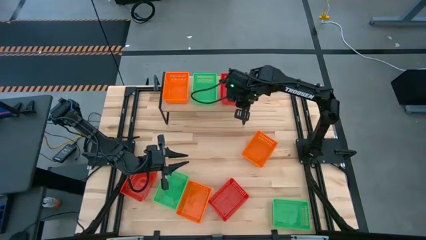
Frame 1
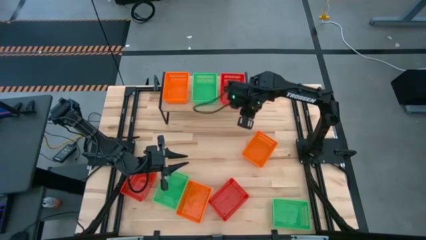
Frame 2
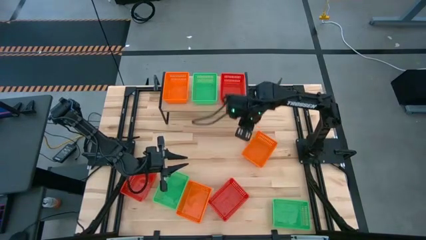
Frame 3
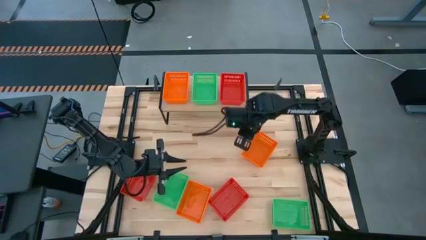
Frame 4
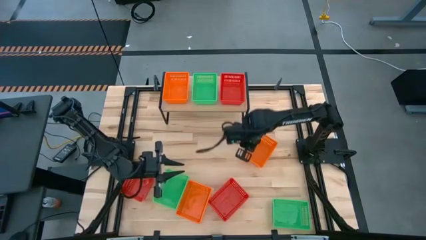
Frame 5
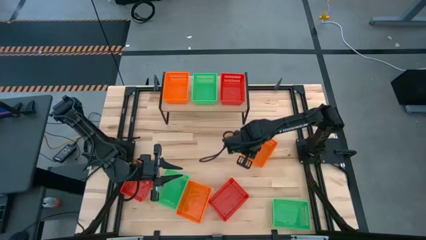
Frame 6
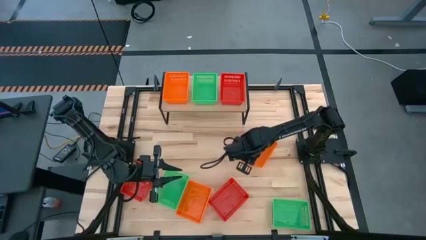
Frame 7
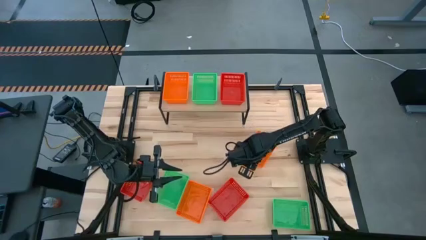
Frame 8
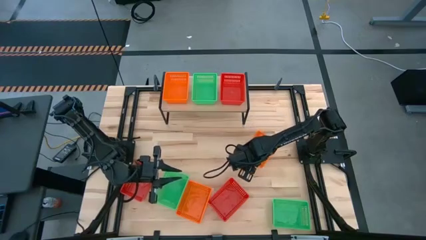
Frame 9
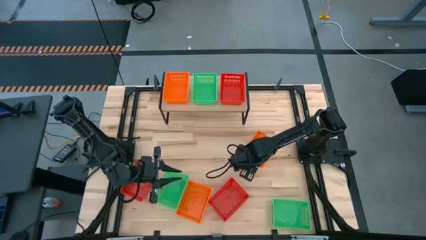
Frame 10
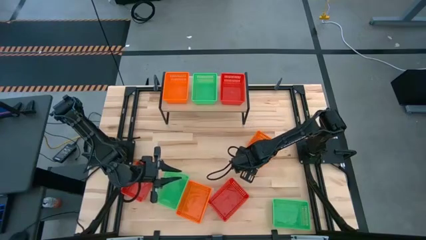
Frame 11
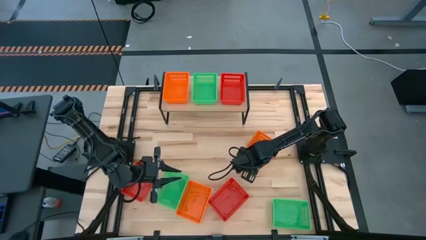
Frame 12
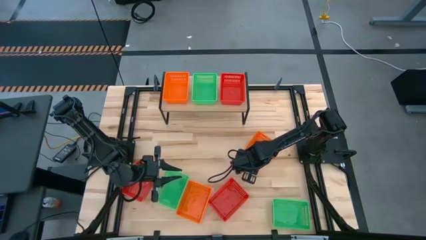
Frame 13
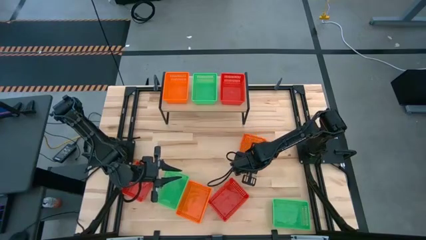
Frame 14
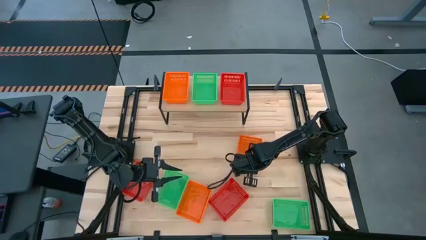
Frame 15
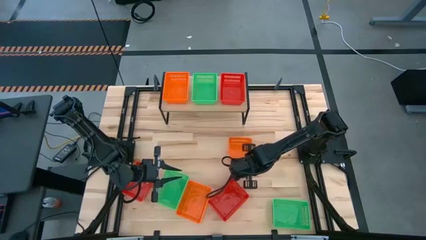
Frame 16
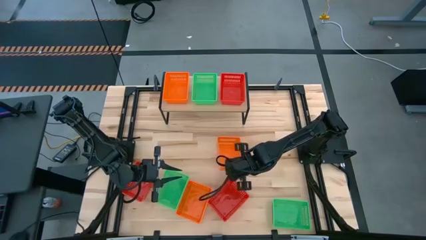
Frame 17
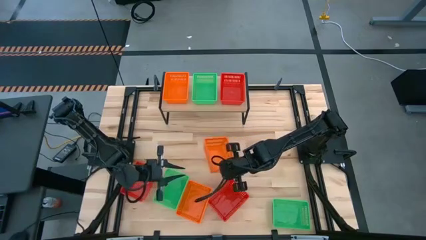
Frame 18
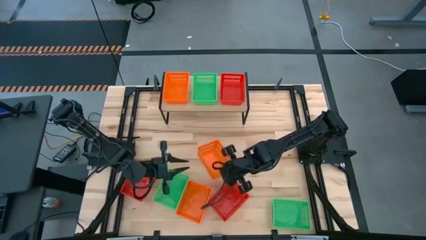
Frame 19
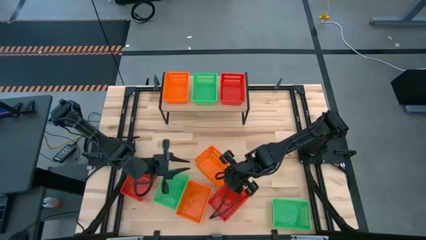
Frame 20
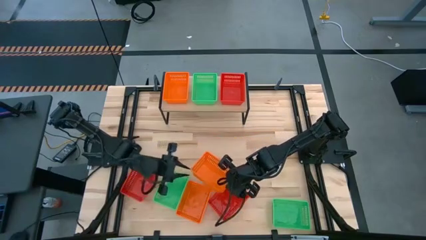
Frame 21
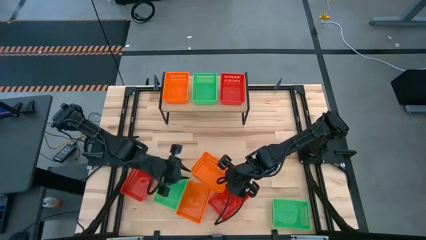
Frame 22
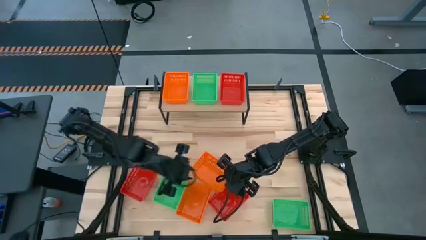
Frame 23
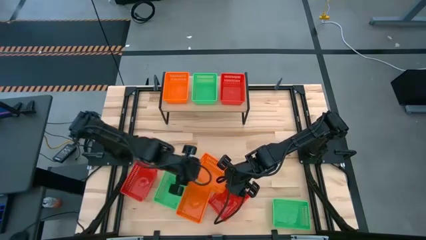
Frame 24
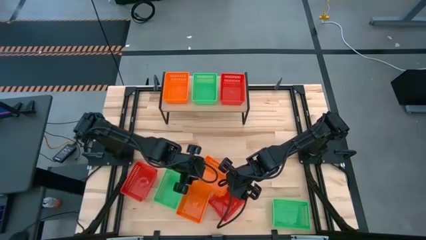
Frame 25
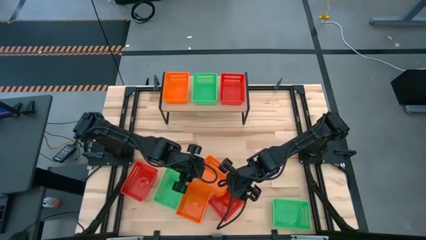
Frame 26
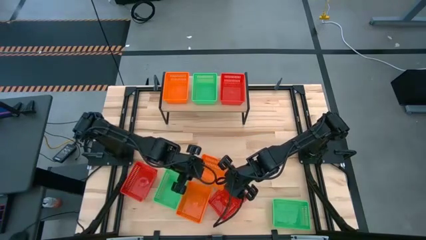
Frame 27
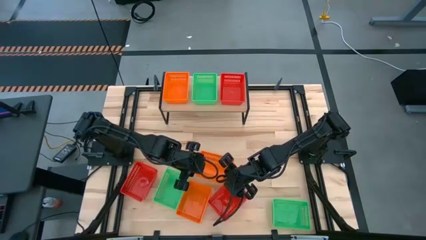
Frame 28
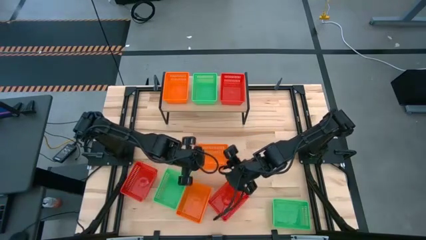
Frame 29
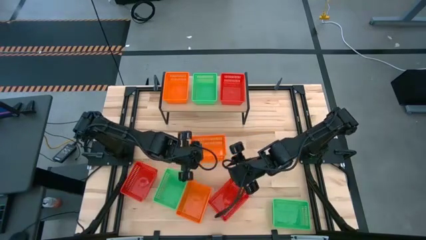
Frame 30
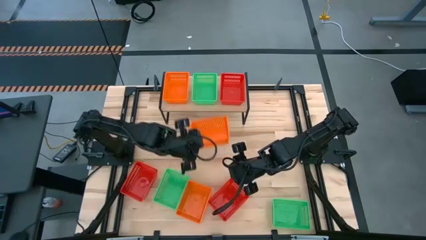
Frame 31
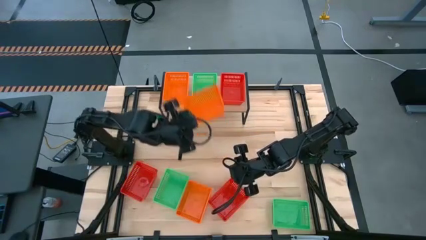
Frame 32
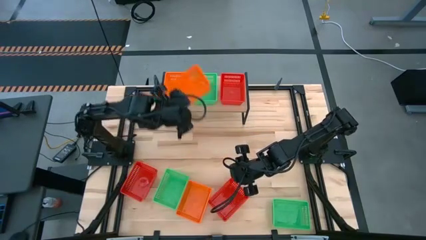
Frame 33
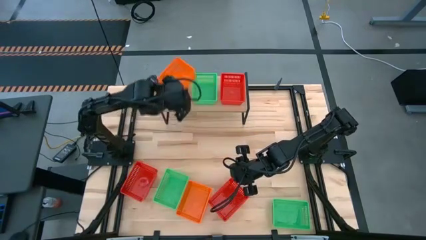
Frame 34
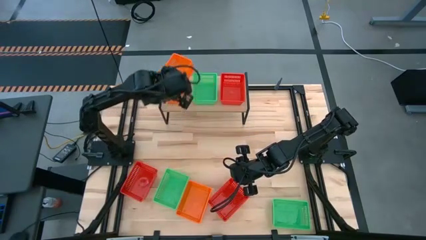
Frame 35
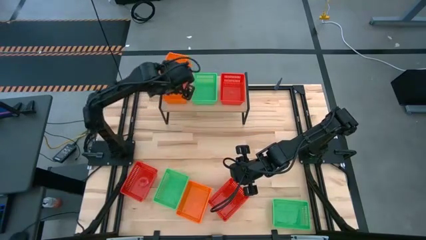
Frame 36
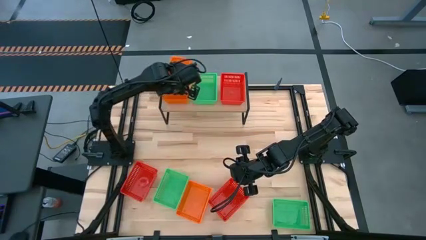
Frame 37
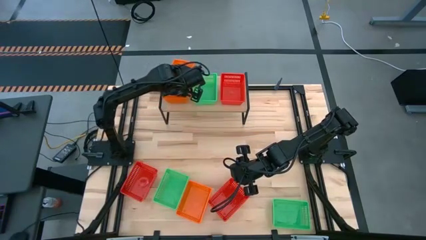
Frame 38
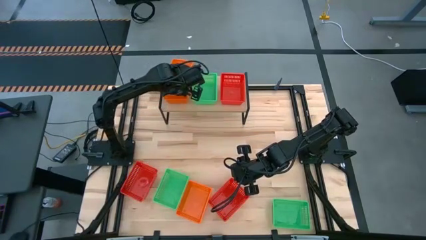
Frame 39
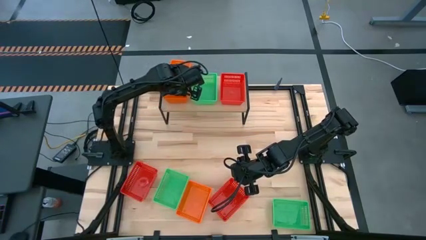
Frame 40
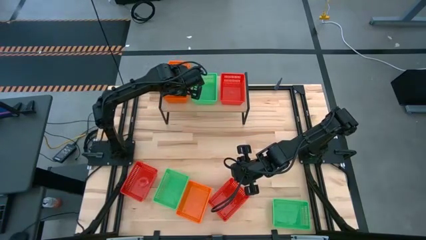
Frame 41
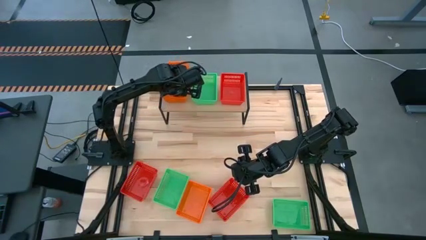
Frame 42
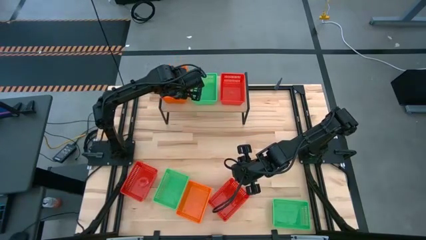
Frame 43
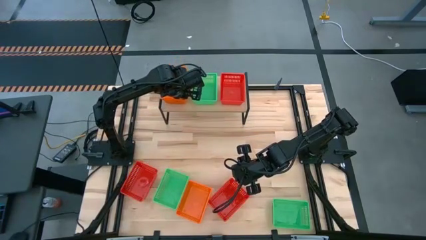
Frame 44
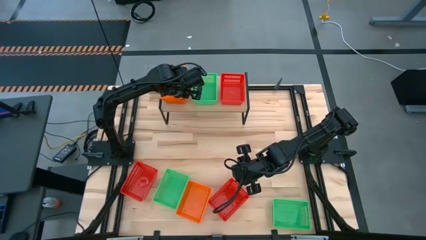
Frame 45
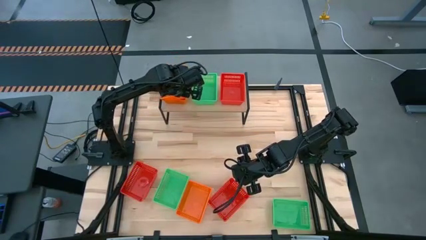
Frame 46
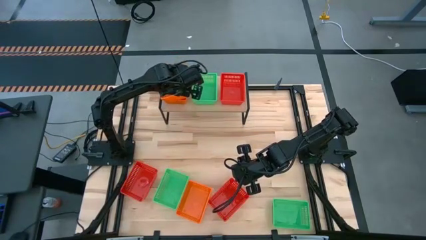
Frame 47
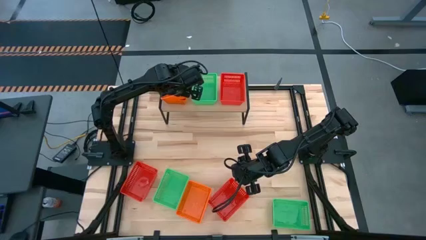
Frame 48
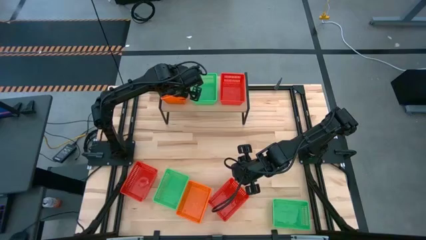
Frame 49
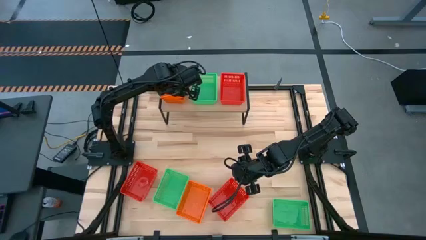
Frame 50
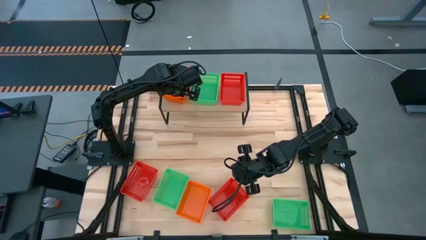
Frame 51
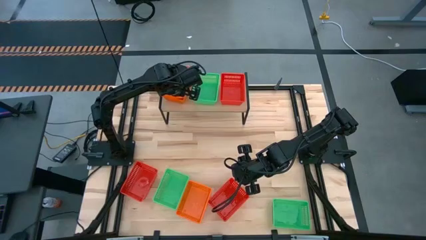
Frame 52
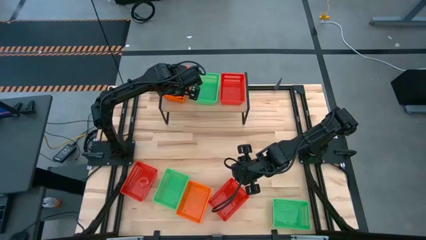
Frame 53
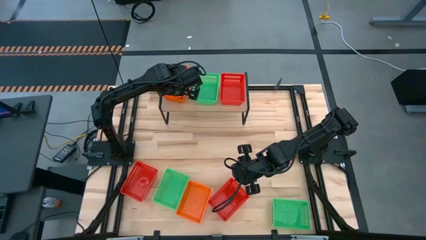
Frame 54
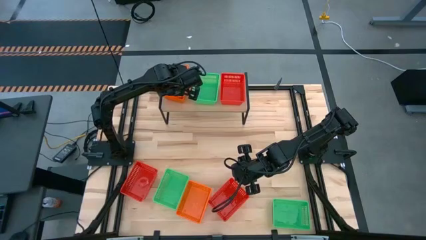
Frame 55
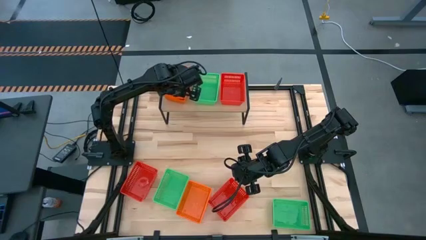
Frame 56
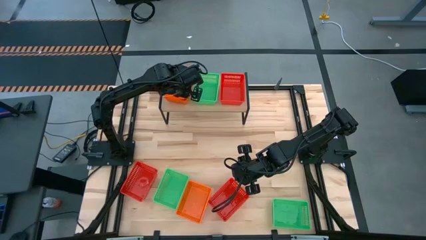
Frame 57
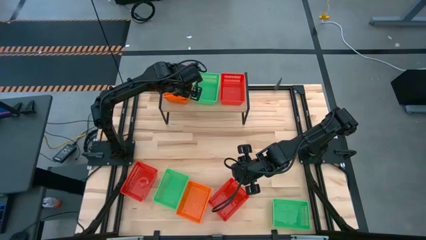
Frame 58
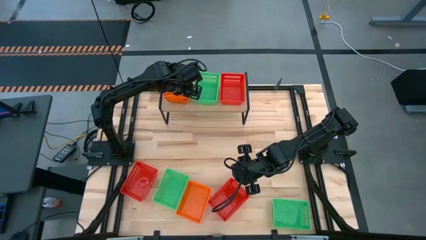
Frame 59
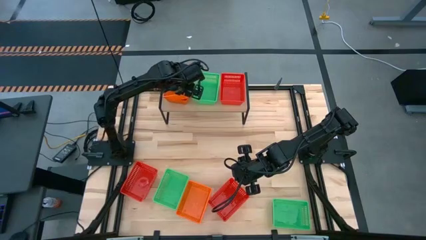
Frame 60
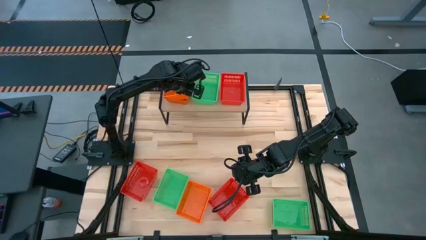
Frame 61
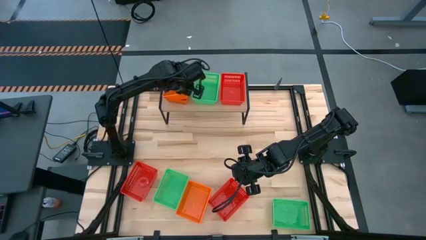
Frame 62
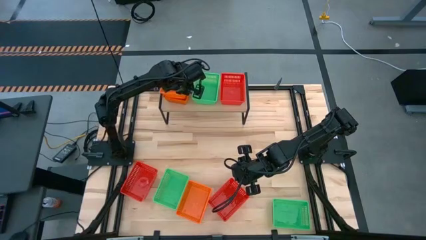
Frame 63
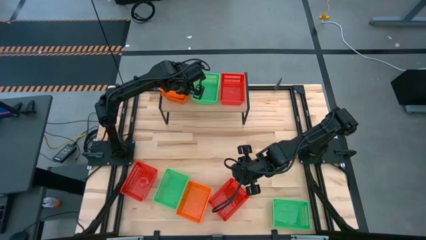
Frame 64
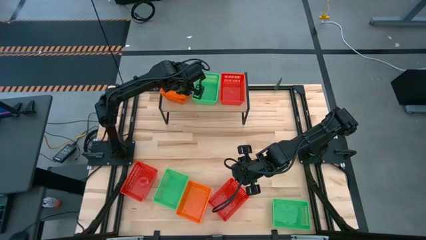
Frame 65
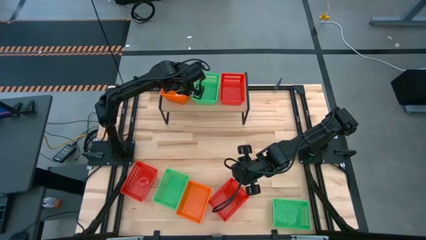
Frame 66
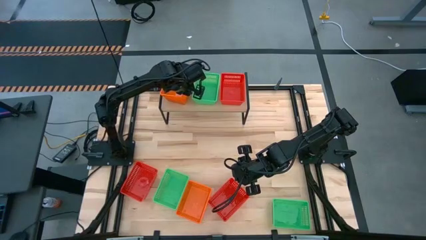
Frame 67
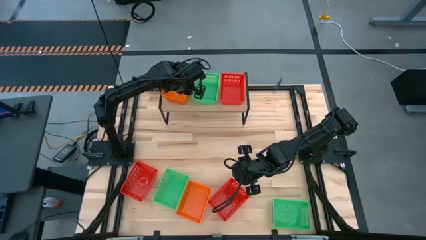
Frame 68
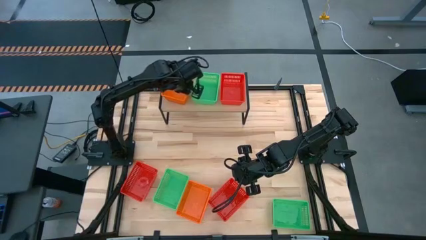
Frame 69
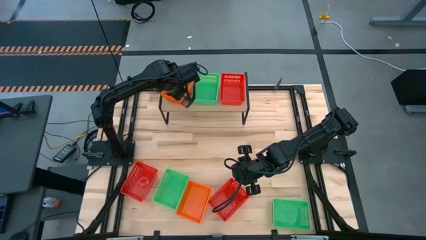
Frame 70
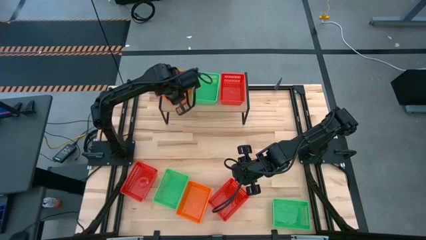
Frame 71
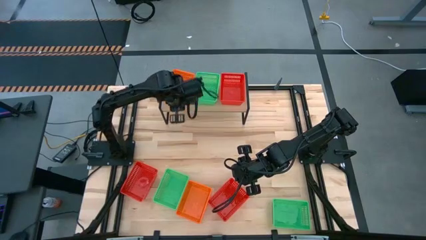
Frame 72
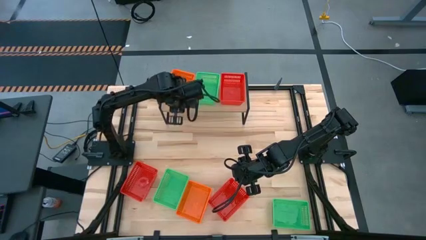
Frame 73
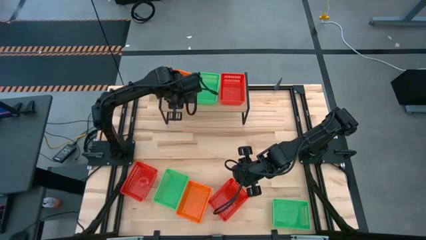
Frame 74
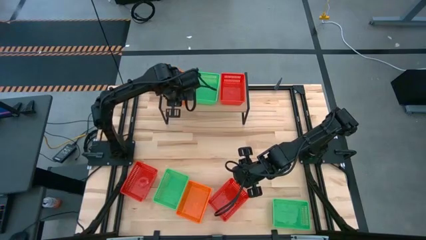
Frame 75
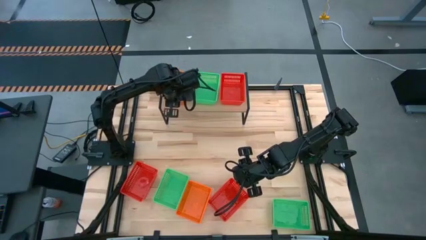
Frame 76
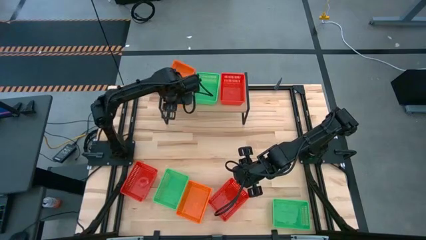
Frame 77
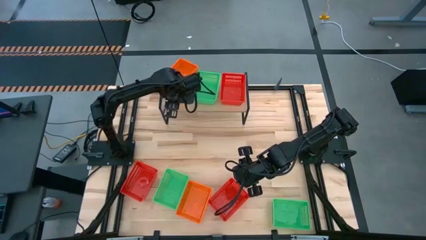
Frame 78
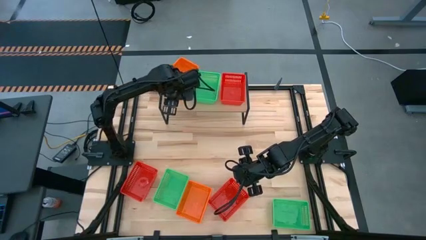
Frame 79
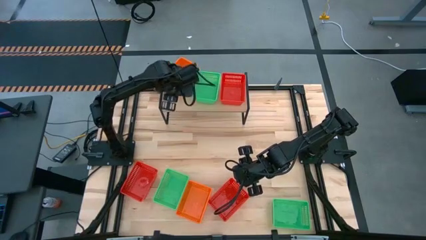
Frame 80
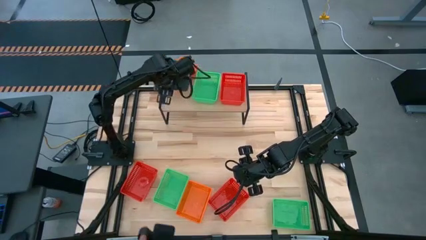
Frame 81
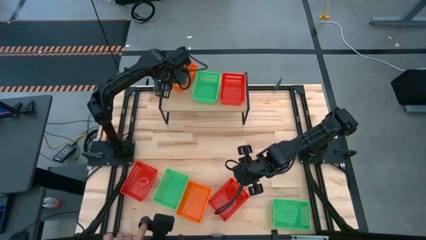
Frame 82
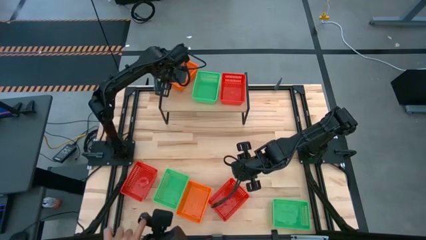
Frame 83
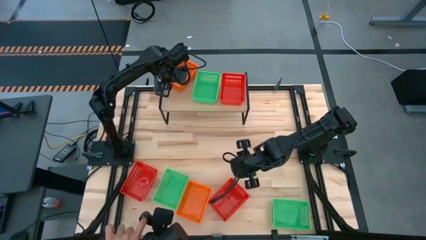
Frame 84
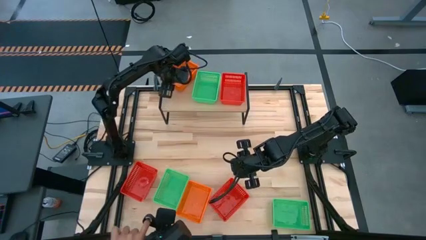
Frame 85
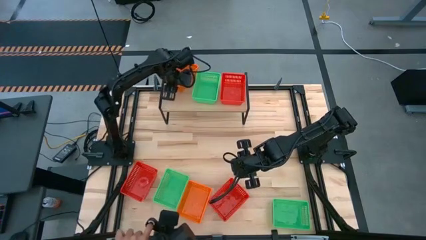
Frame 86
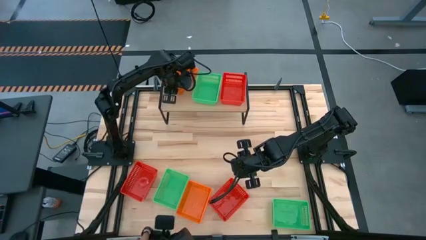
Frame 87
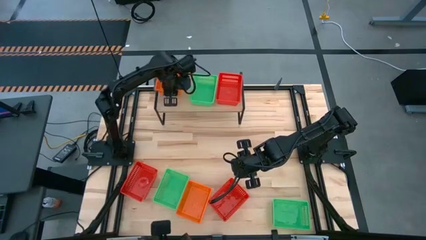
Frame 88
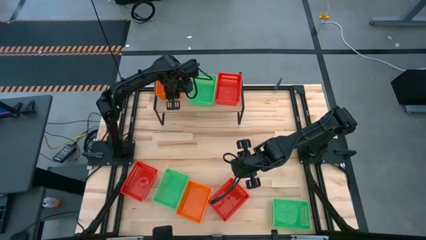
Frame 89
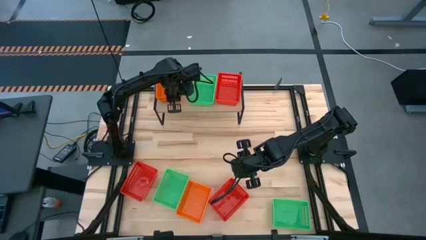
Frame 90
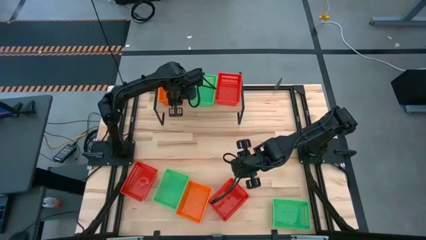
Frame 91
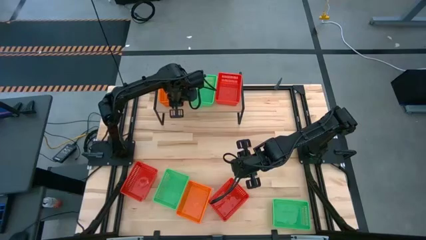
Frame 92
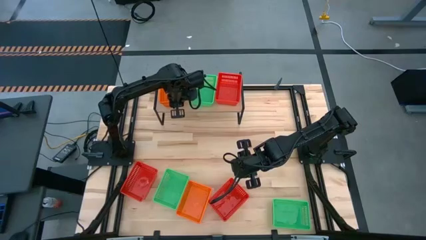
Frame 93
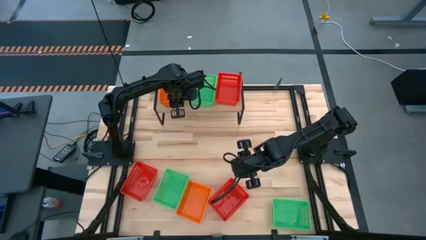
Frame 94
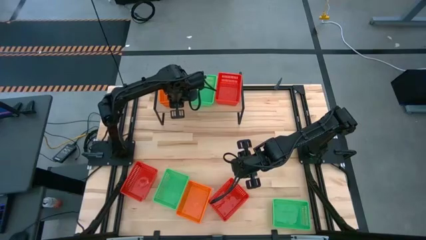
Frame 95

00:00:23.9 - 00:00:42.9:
Task: Stack baskets on shelf by color
Stack the top orange bin on the orange bin on the shelf
